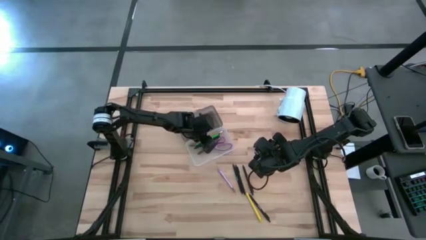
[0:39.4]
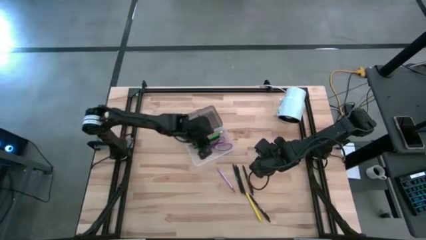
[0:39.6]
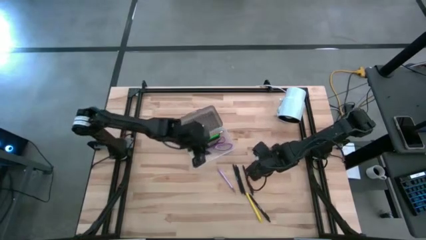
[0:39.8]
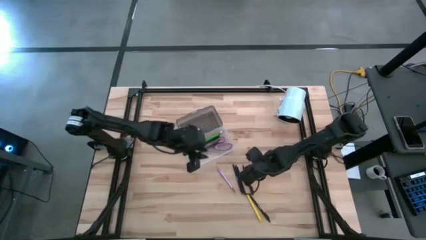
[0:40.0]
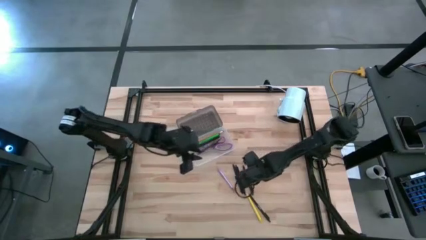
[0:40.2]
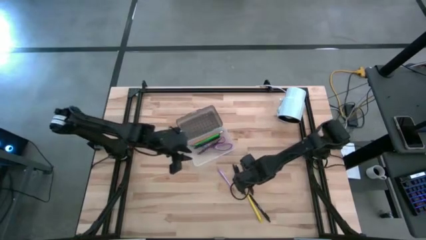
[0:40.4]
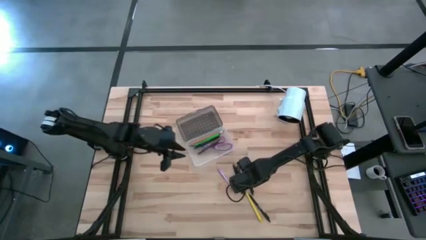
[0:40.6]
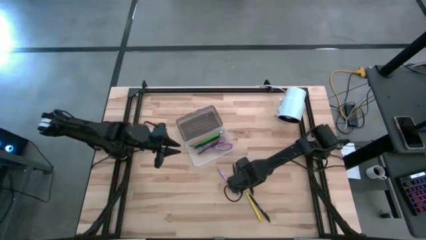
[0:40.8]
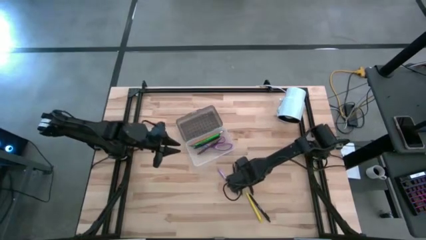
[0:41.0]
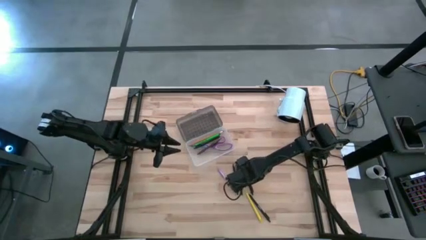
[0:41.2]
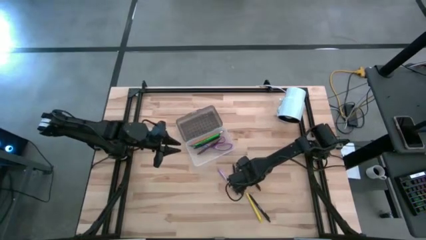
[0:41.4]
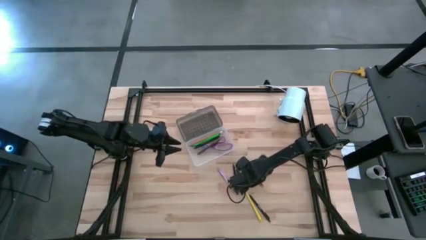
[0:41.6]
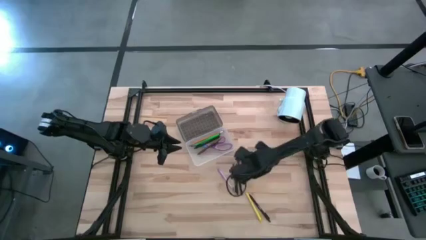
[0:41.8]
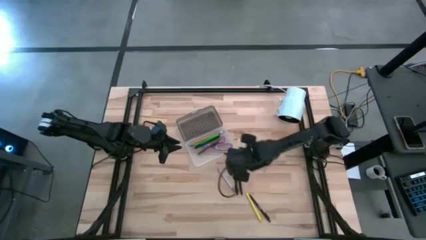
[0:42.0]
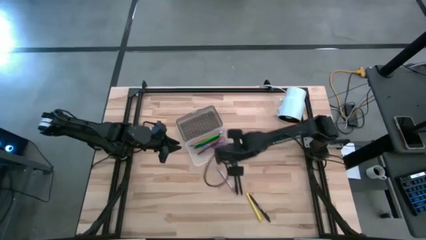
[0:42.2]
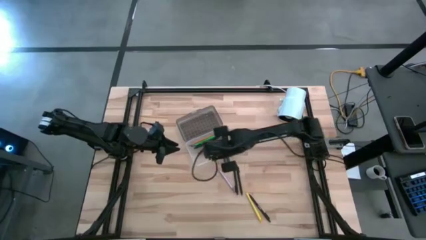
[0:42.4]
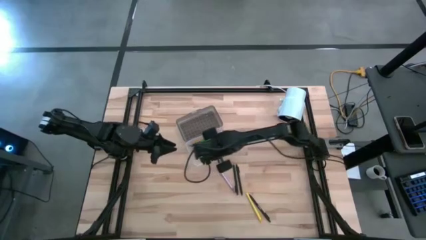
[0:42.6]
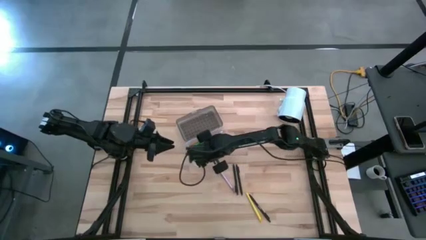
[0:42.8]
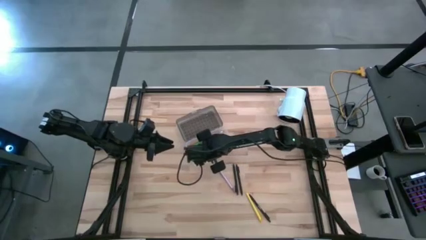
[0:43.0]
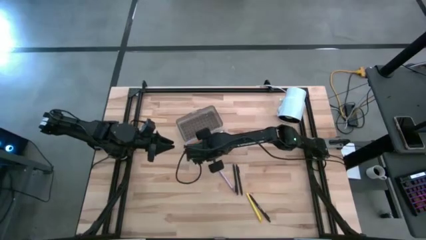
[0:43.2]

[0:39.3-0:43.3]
Task: Pick & place school supplies into a supply box
Put the black pen into the black supply box

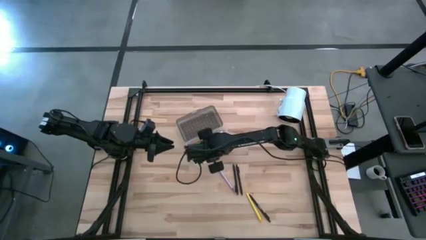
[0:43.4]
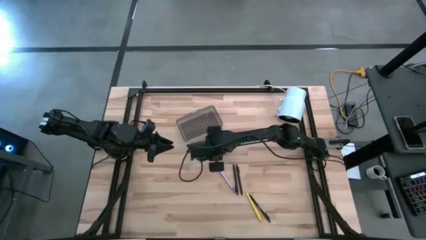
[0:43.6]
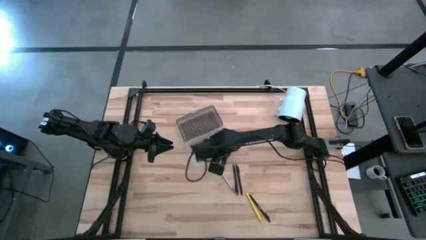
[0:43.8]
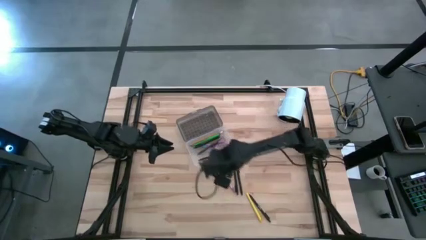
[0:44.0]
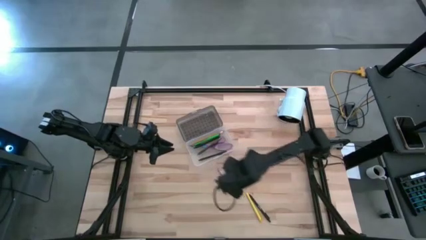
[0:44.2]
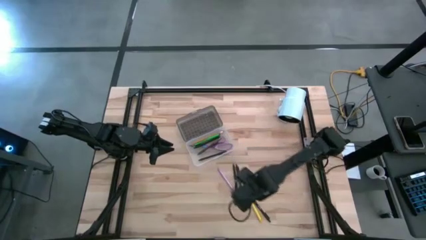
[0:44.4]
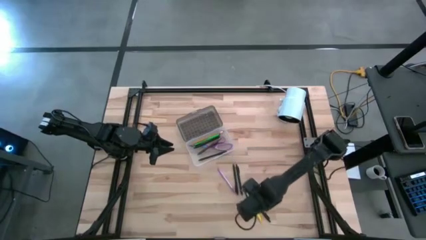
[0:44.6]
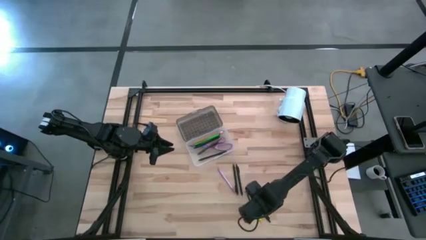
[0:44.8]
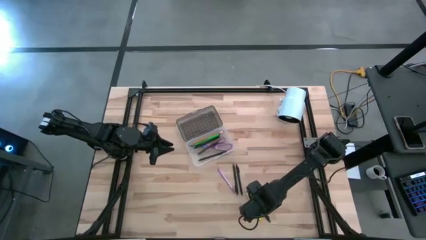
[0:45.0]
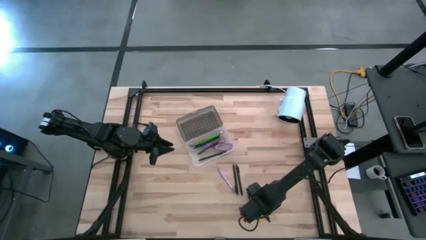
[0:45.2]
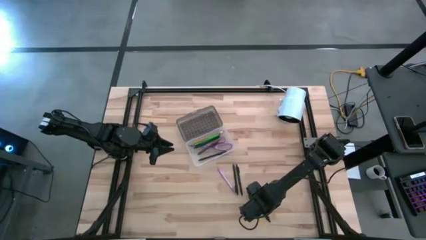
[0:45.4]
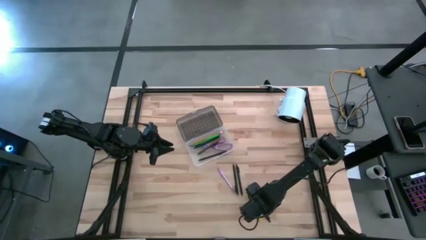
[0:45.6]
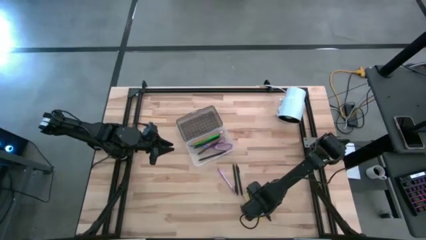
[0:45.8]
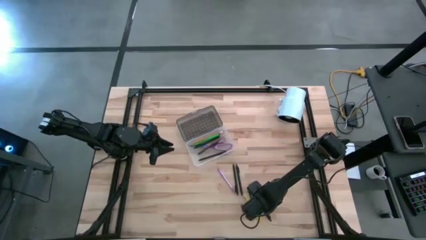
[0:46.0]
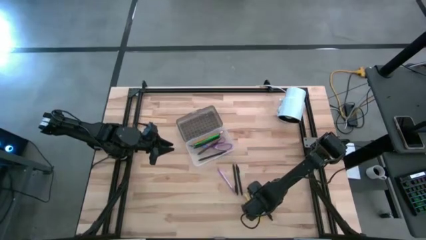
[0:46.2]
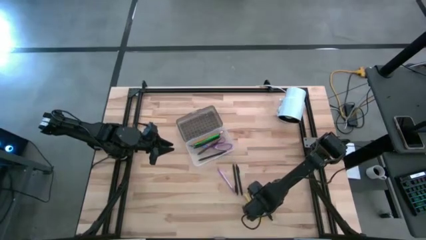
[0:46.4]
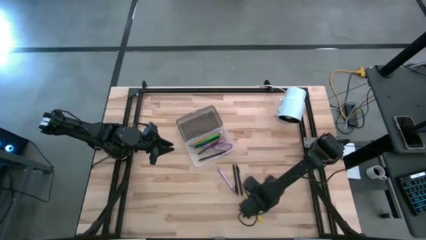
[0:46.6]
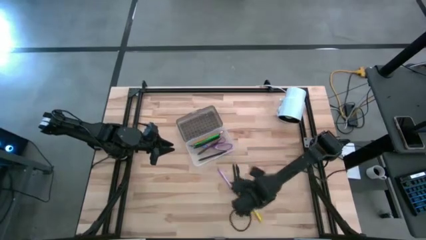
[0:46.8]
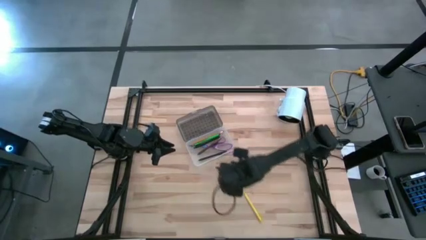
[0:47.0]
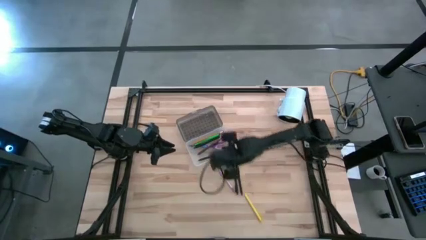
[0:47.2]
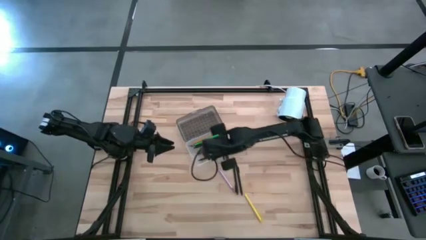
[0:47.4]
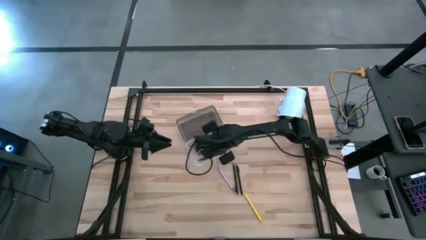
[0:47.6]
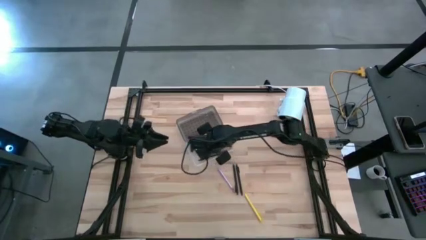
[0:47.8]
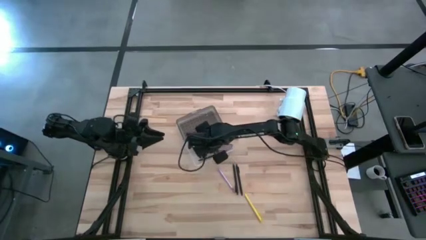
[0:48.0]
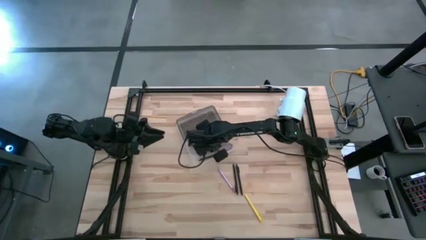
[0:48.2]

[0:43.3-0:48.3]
Put the black pen into the black supply box

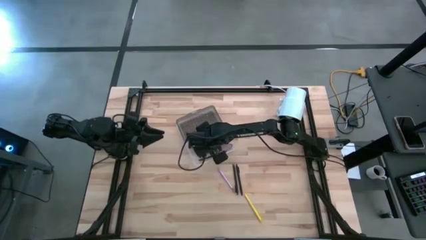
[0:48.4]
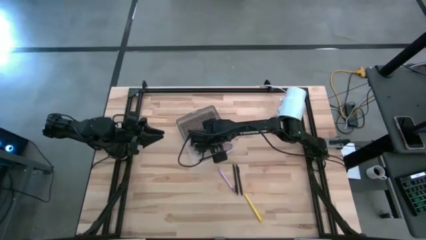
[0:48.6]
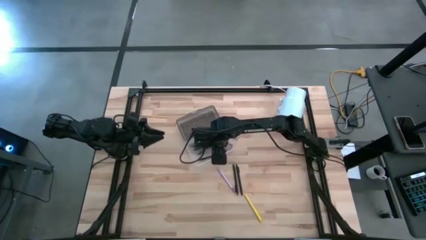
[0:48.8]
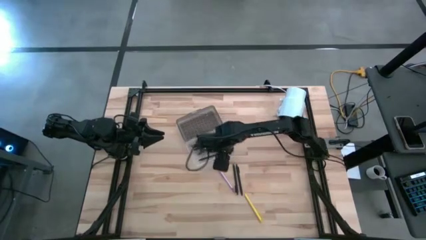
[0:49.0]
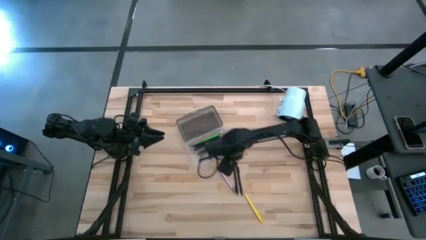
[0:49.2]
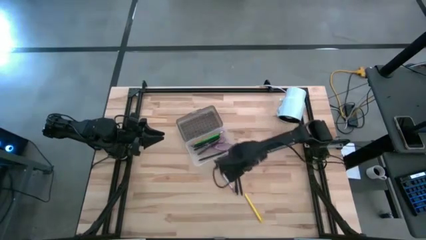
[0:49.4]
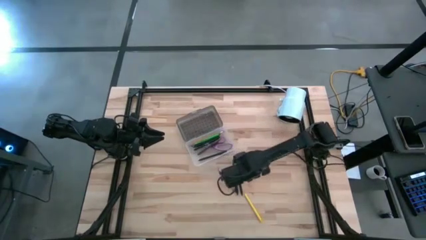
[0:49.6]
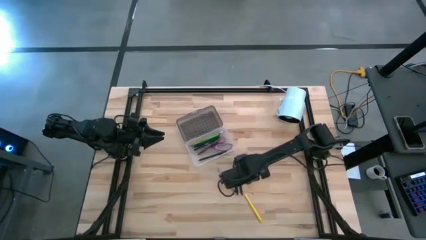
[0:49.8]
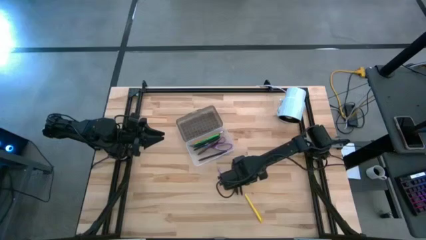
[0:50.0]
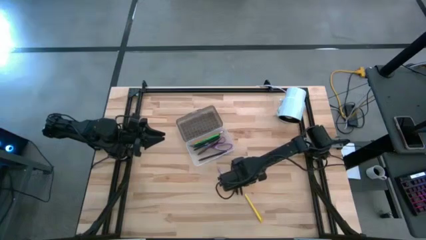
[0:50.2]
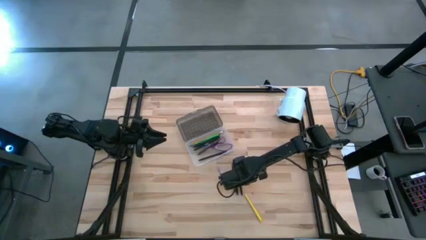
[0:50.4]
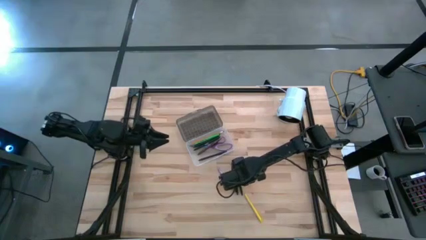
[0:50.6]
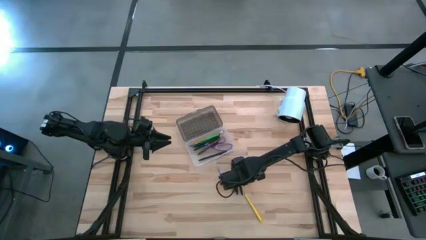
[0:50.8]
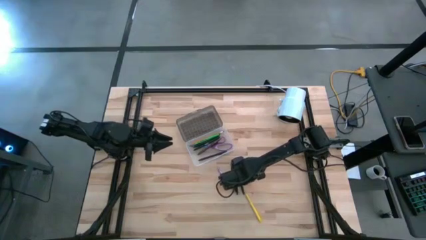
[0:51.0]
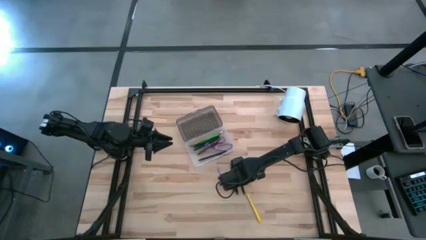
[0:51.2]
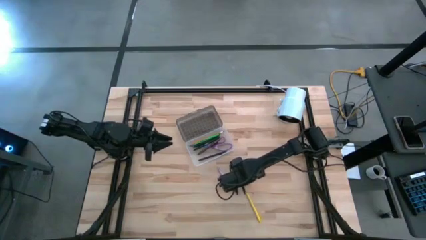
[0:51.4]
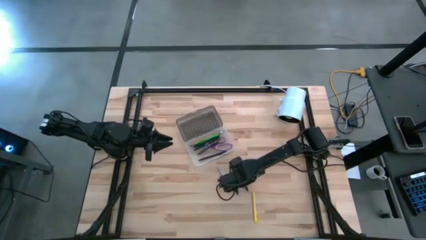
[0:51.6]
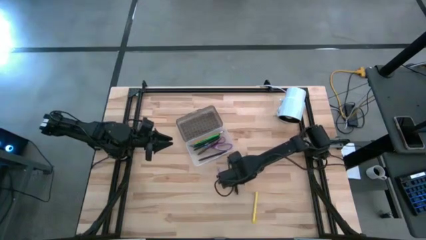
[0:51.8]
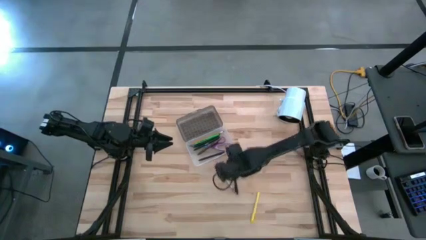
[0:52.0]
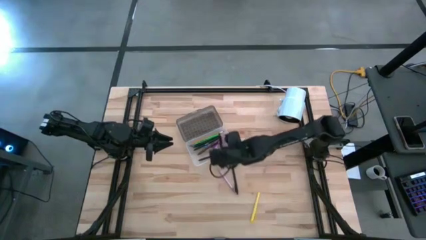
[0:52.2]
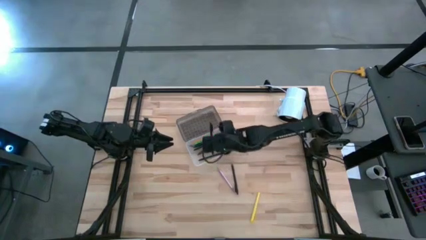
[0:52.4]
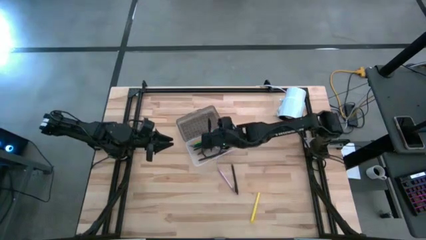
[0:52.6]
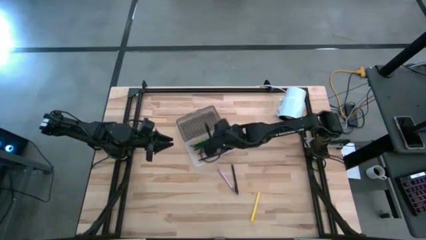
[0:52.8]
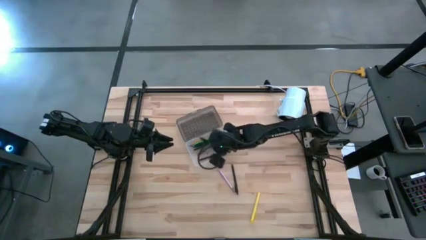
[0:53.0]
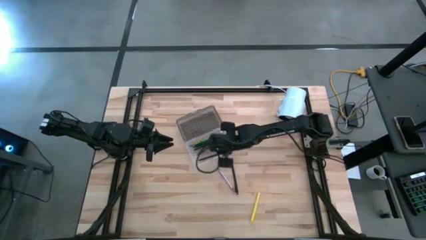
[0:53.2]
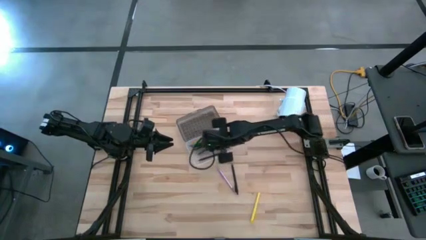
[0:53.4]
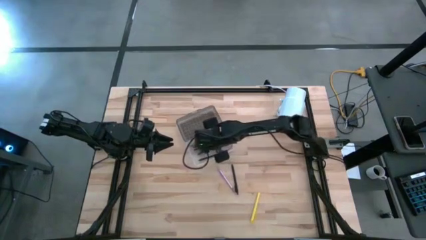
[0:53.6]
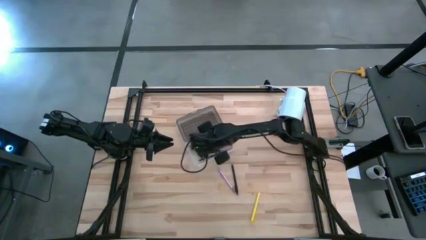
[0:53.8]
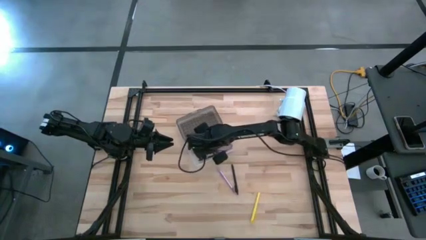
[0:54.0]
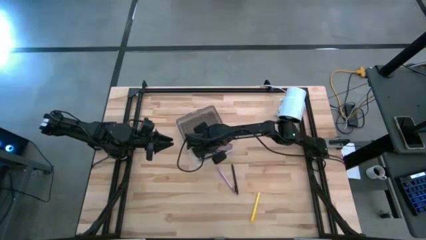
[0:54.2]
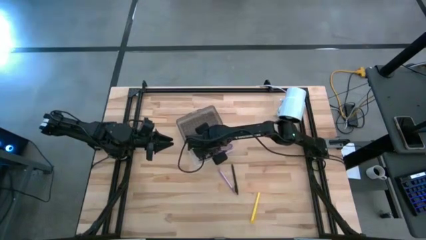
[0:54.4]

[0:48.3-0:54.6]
Put the black pen into the black supply box

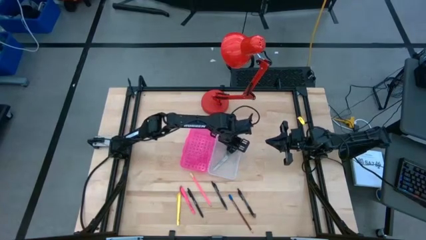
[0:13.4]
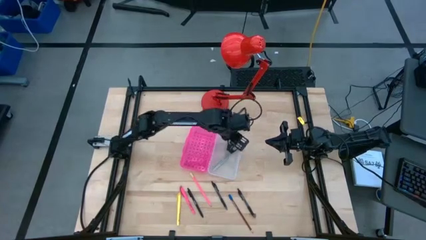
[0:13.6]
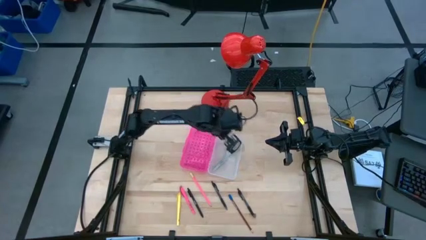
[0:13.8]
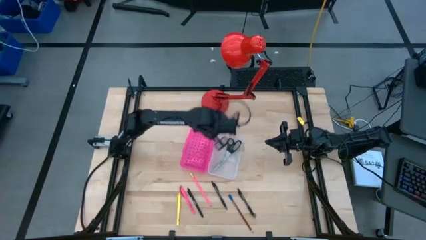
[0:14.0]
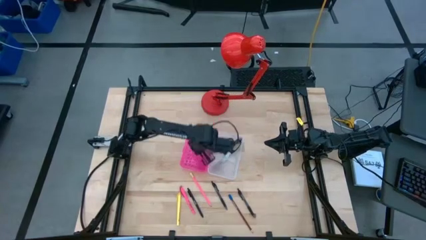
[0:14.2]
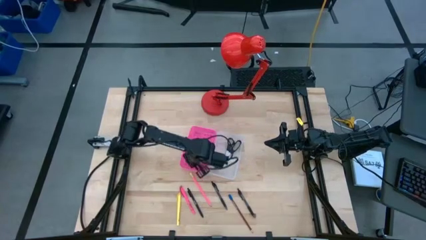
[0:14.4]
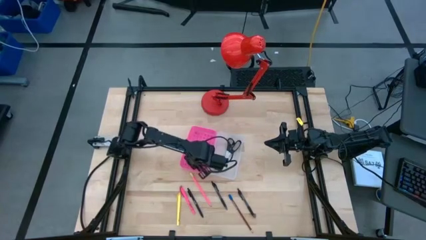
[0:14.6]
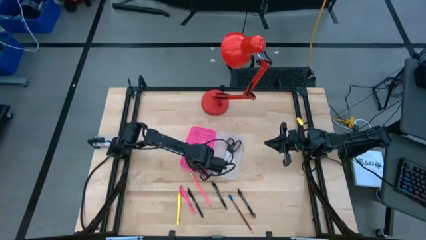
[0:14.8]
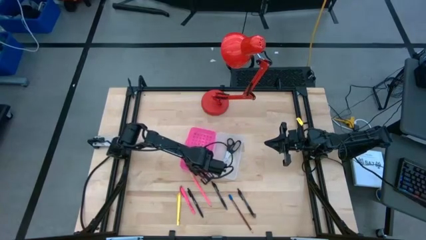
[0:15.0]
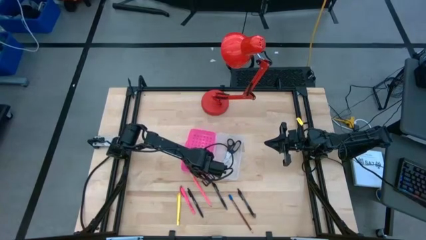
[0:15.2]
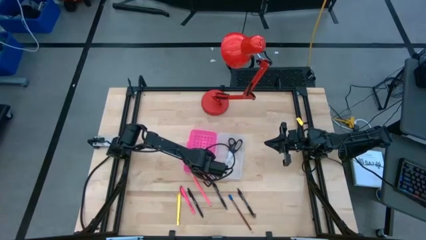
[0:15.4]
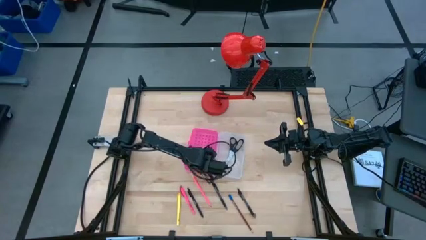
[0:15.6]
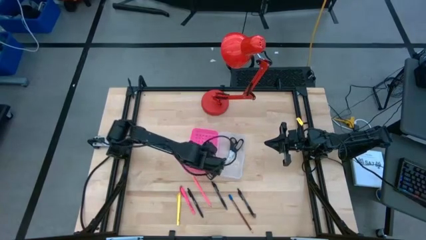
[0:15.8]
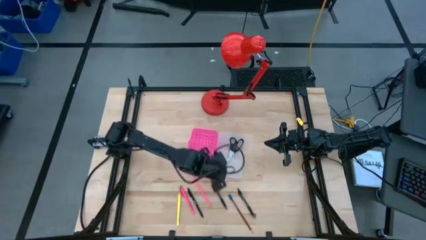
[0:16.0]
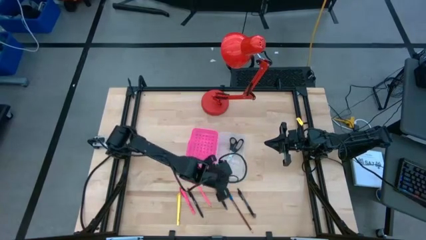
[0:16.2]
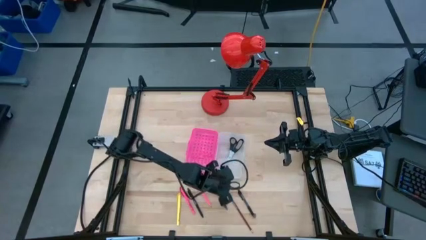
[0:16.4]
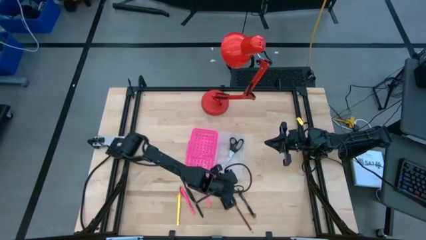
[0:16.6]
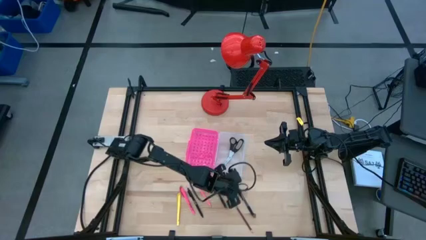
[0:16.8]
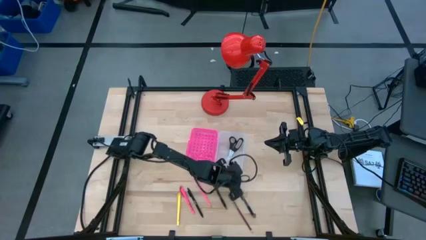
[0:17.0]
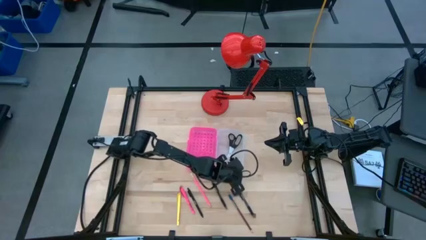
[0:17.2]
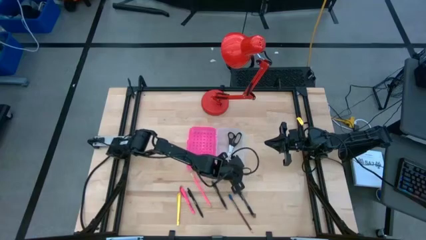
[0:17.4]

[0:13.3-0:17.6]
Task: Pick & place school supplies into a supply box
Adjust the pink supply box
